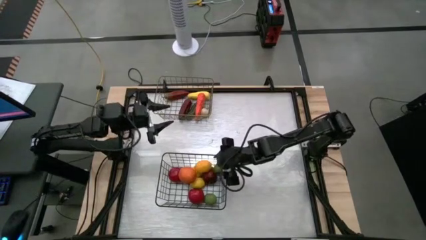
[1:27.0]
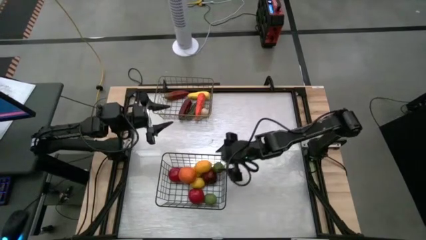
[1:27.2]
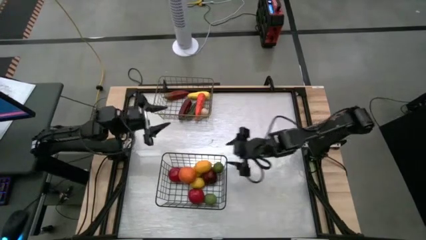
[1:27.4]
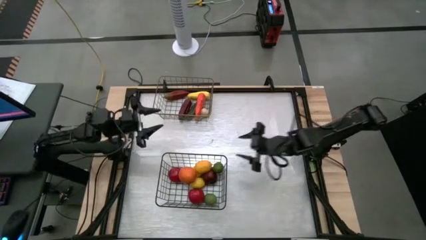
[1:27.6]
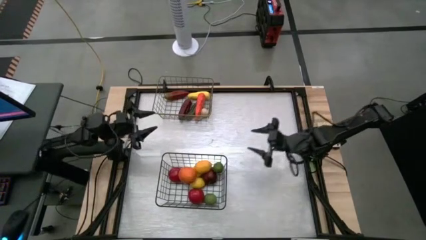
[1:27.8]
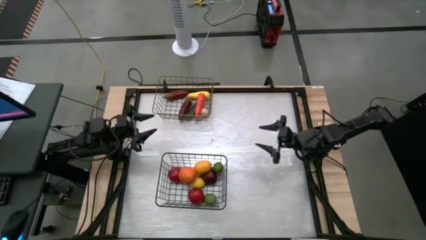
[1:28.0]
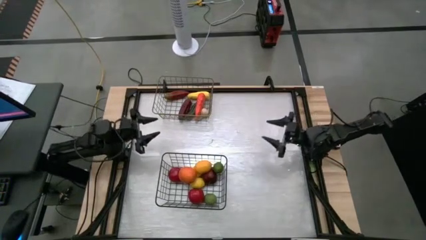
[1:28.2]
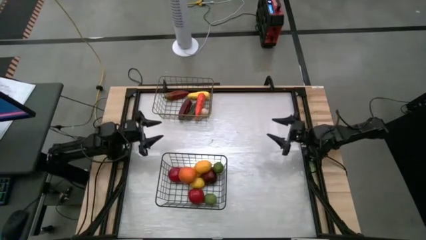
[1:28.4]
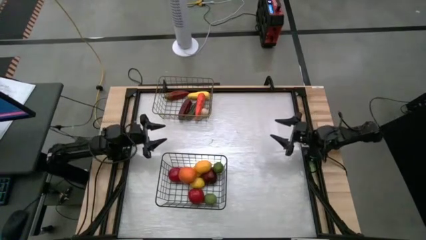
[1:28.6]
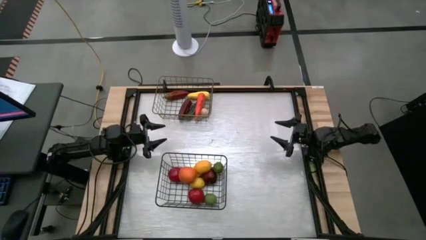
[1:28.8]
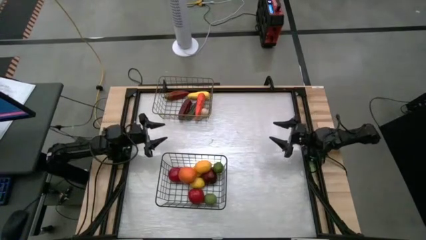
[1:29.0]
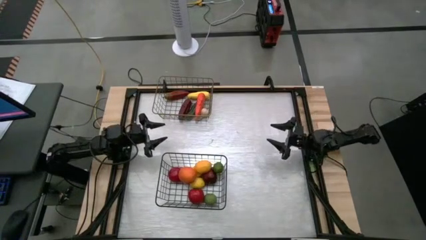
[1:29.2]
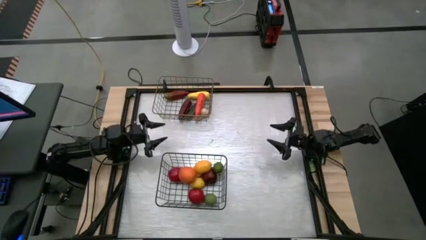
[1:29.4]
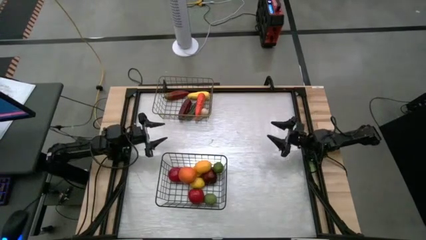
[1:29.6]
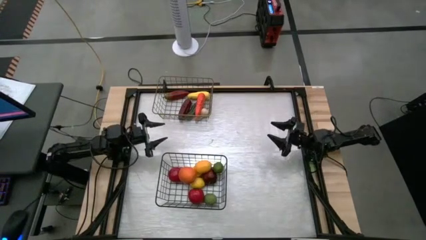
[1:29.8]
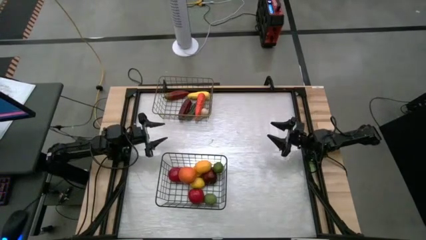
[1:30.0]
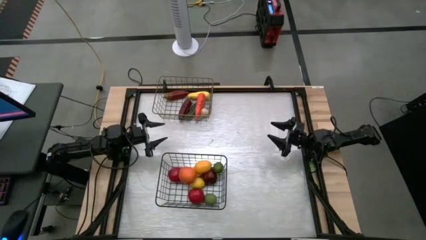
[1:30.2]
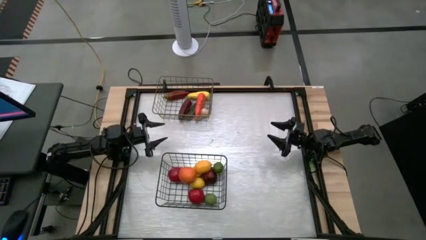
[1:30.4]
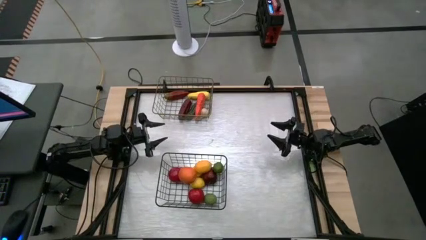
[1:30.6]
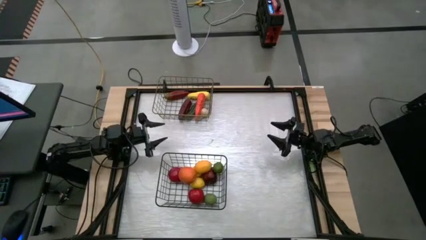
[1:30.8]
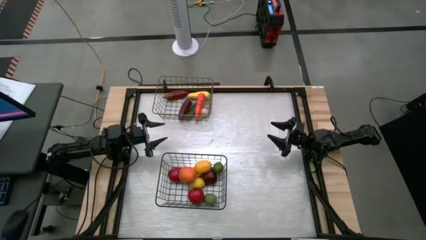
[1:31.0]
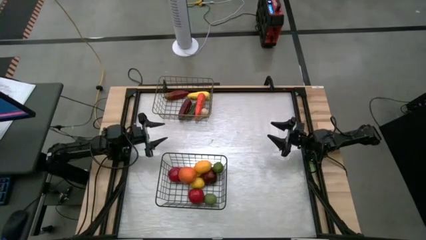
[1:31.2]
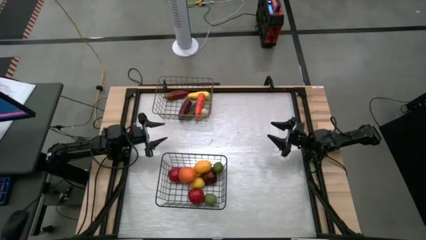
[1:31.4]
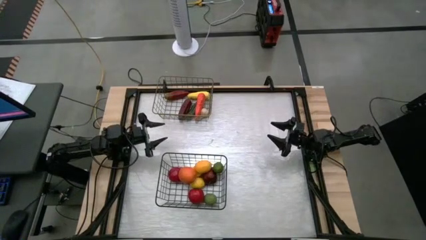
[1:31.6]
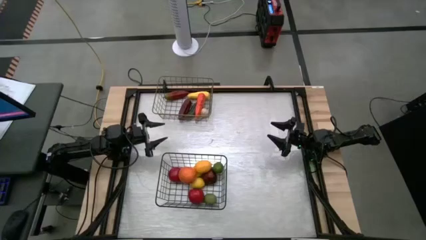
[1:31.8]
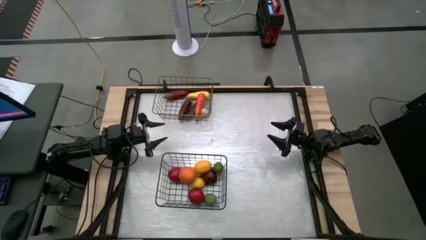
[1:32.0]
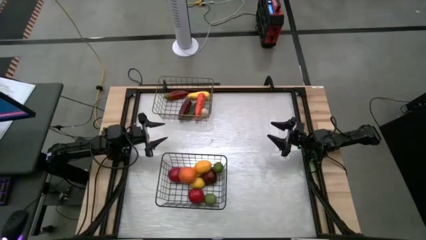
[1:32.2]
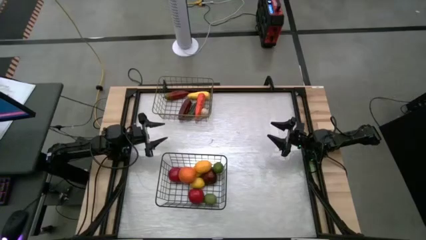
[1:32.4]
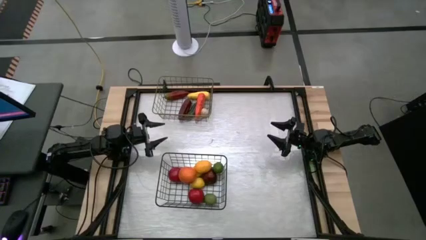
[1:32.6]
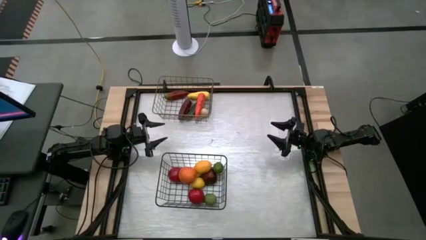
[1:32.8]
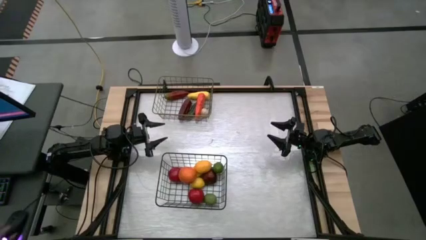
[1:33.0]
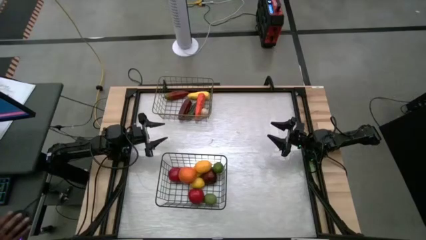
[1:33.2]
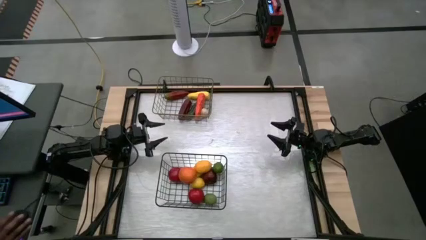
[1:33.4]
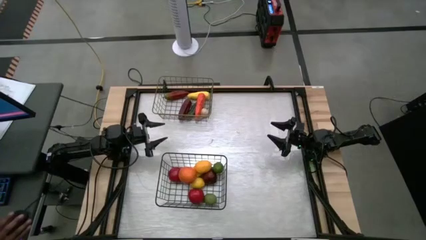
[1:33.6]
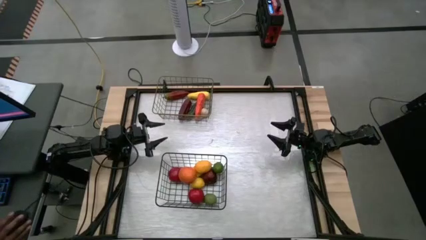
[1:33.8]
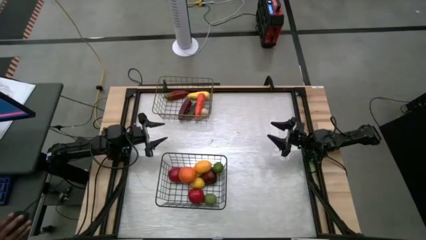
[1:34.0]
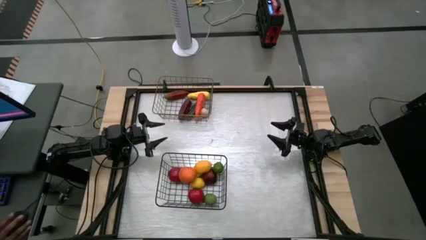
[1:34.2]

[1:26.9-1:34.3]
Task: Sort produce into baskets
Return to Home Position

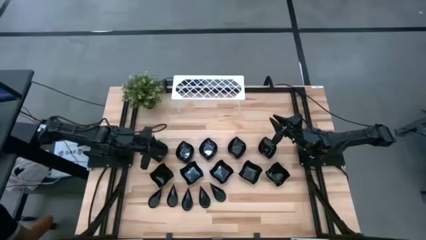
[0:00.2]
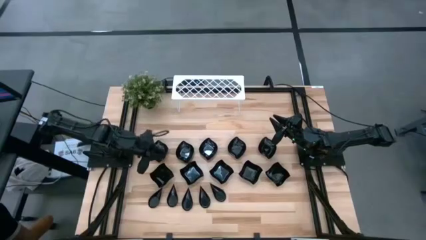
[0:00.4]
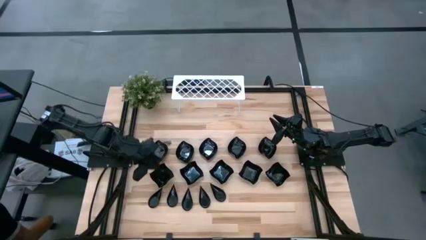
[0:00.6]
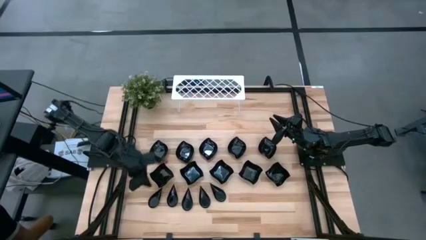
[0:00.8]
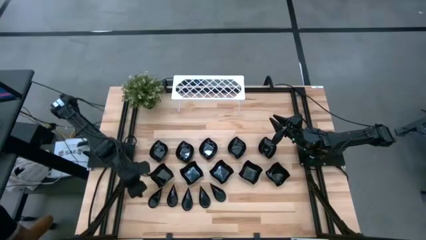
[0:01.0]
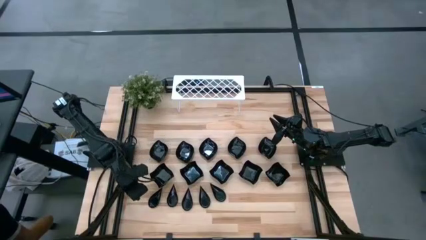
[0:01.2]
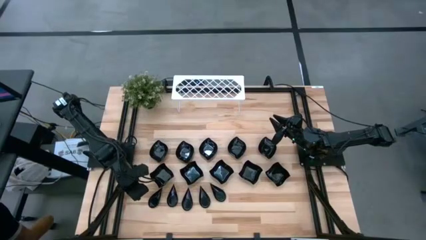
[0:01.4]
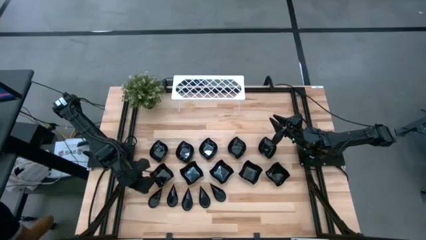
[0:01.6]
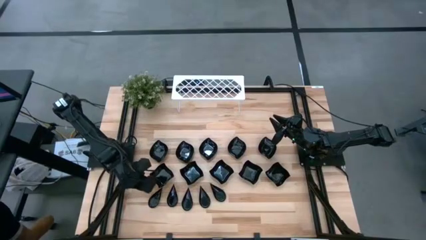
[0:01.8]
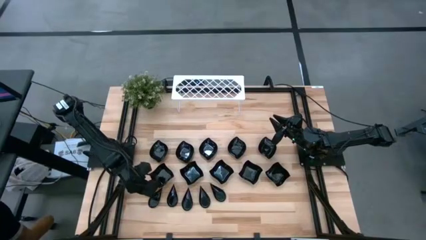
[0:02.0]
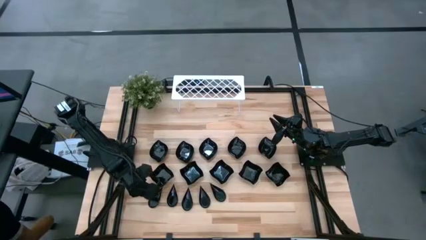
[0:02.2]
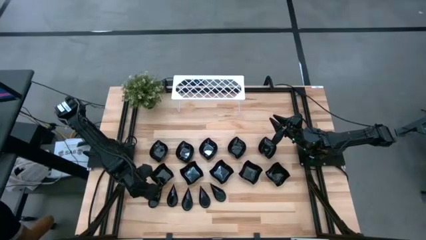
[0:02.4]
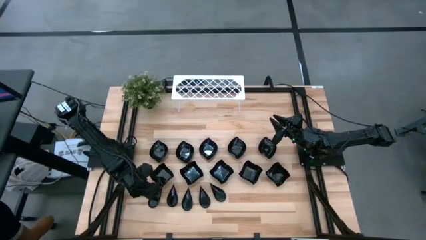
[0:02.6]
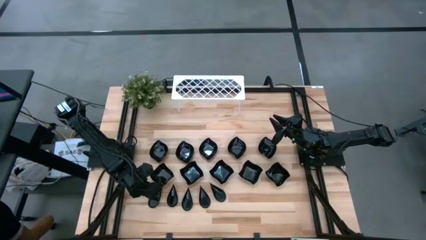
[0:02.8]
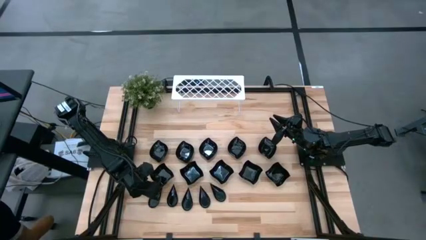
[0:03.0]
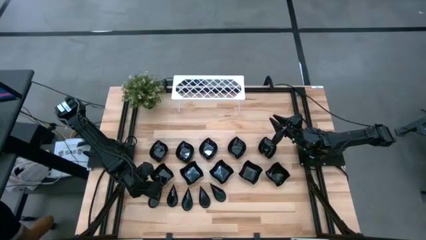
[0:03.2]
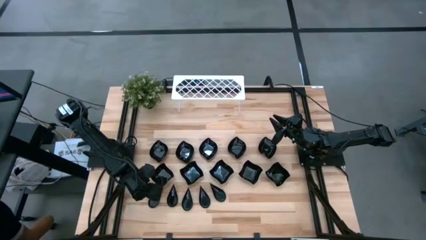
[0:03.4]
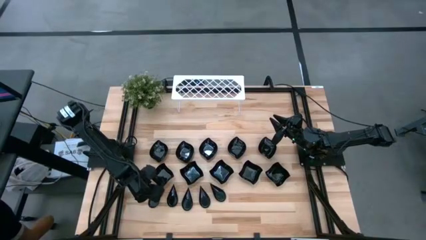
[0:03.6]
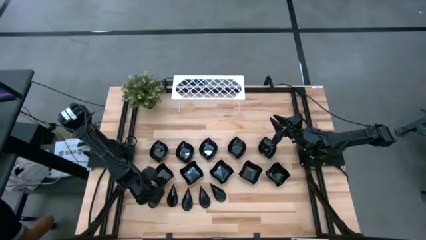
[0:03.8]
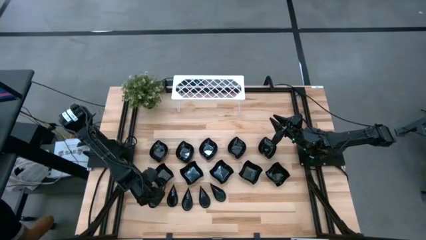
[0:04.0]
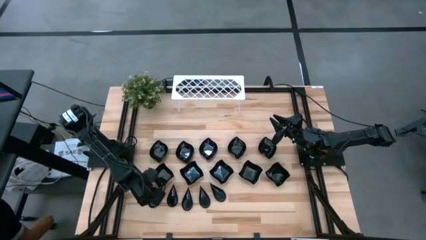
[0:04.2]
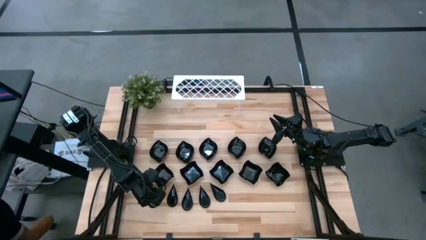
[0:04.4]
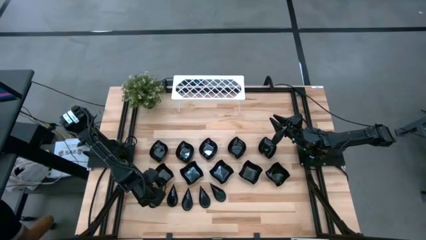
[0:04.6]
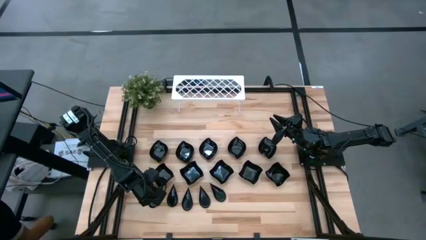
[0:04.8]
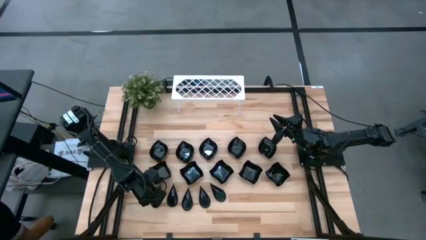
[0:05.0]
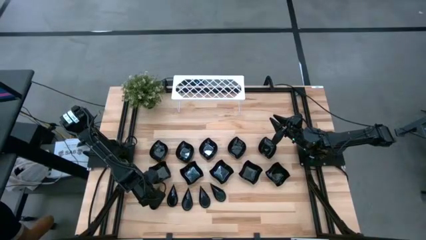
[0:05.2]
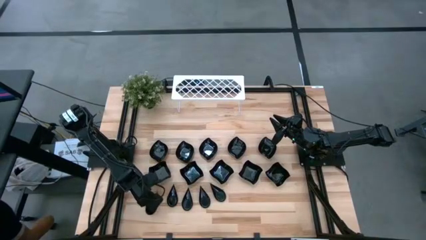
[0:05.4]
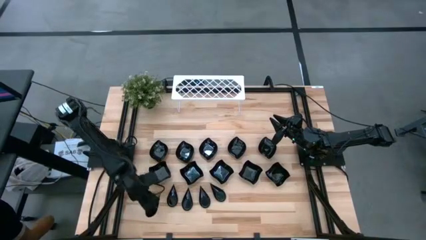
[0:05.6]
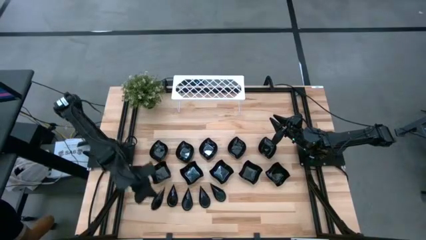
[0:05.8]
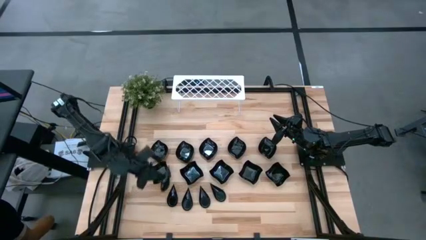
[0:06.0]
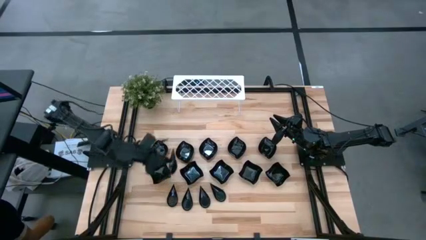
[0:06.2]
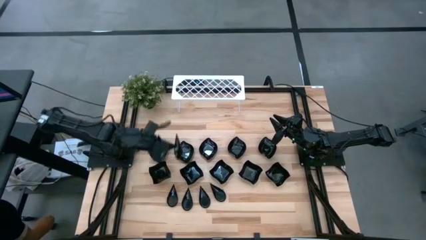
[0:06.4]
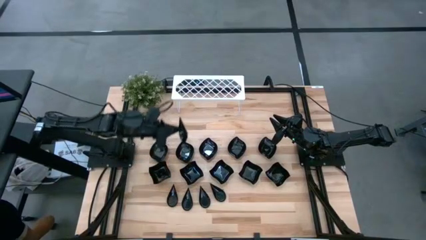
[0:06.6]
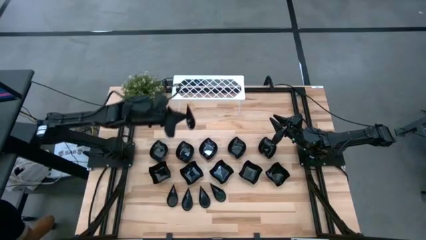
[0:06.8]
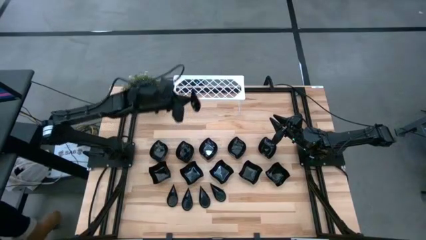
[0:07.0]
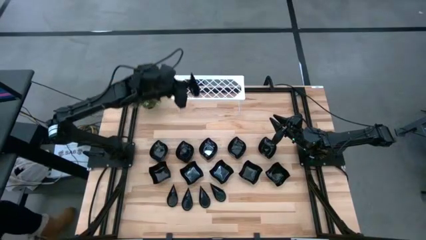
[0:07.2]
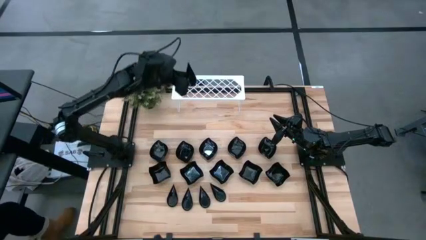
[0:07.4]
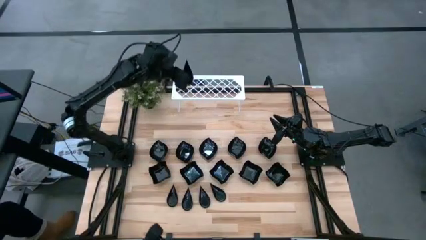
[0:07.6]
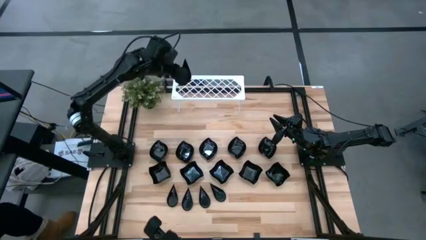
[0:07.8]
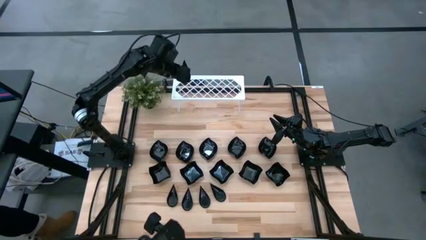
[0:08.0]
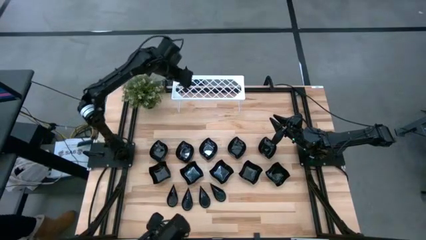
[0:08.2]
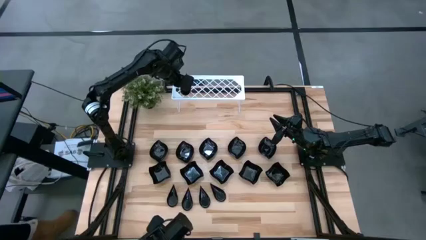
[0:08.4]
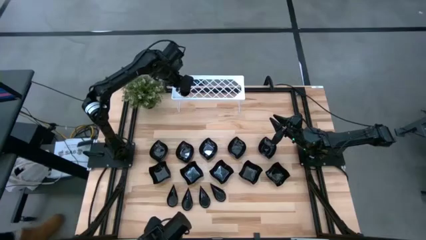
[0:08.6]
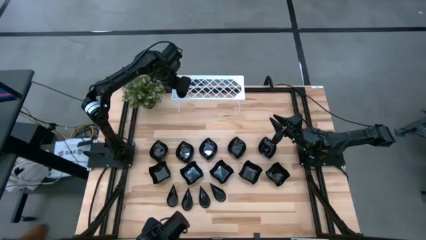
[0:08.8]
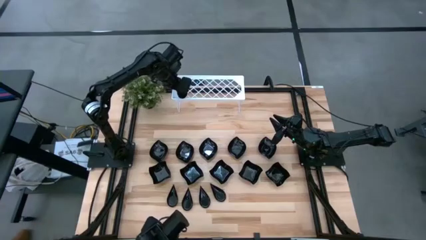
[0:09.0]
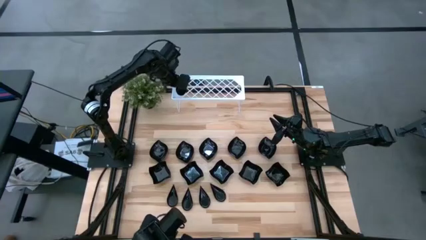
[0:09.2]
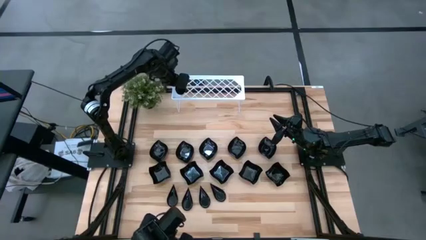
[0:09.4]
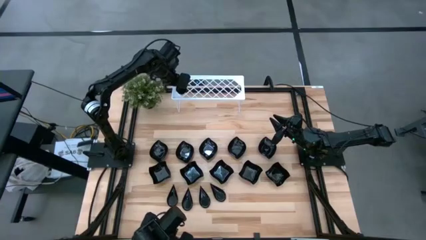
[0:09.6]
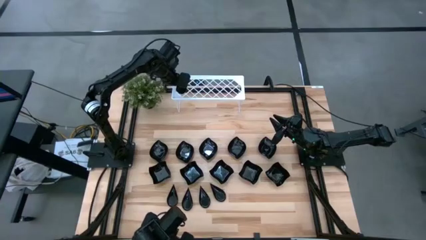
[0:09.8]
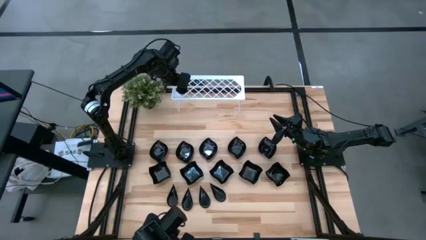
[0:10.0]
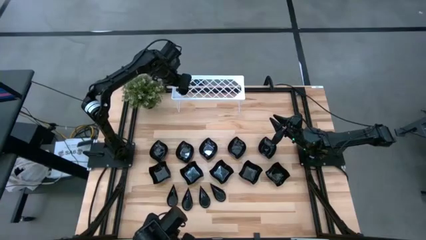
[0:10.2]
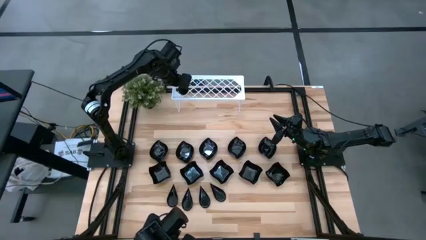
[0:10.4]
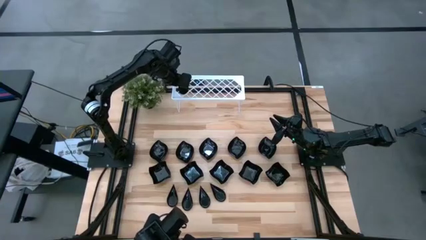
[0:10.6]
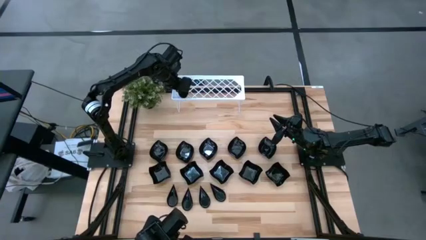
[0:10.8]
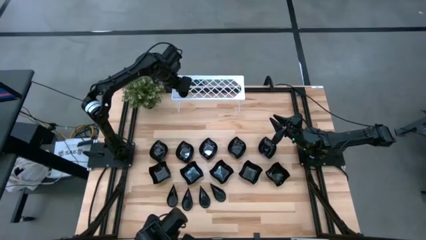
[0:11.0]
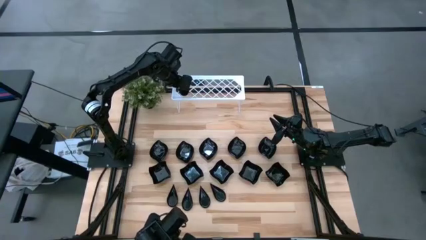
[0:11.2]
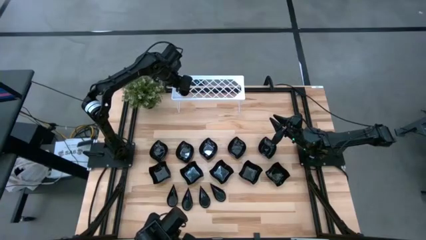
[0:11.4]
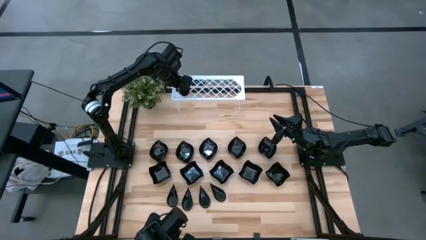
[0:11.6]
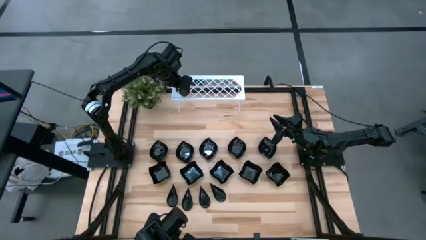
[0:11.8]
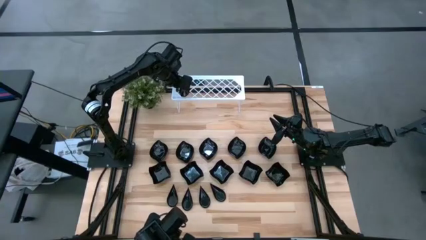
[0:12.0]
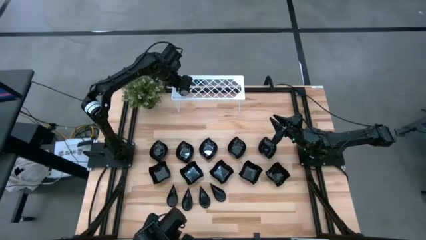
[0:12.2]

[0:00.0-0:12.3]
Task: Pick & Place Mini shaped plates
Put the black drop shaped plate on the shelf
